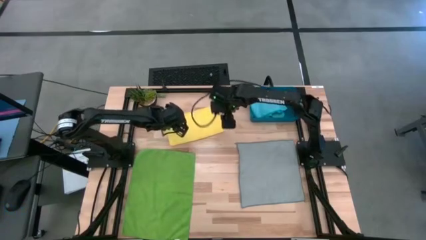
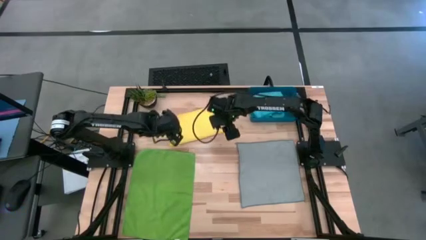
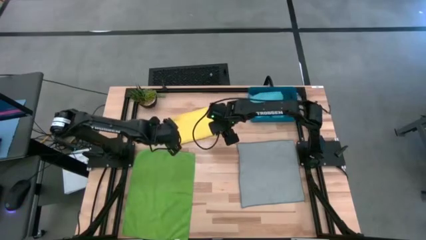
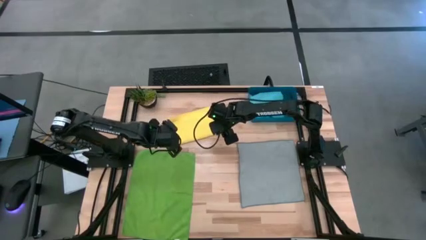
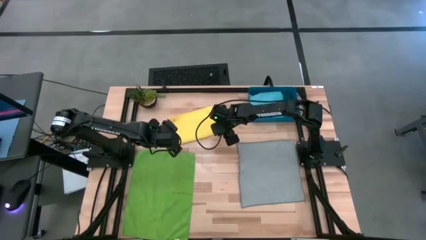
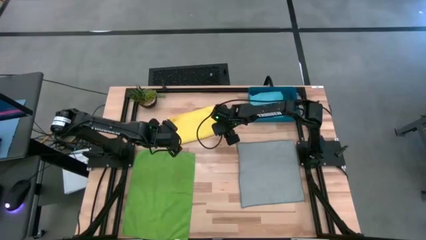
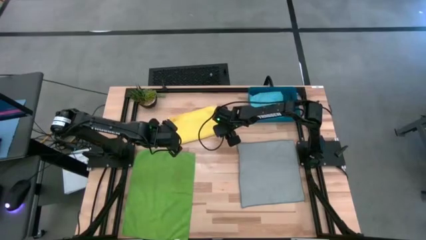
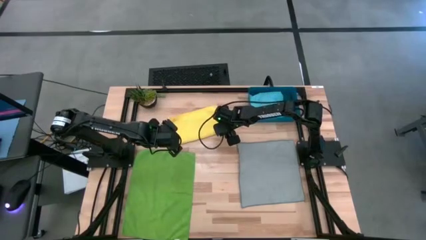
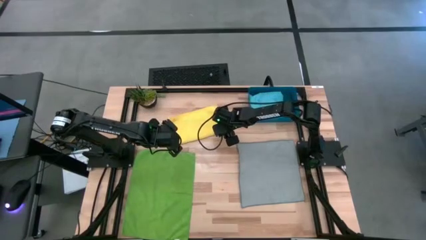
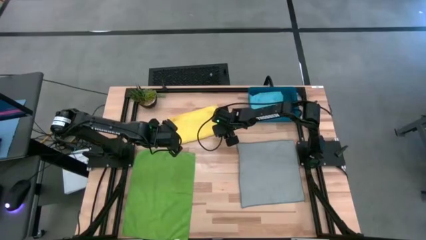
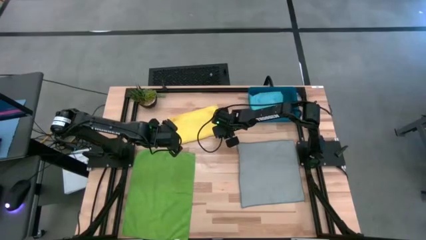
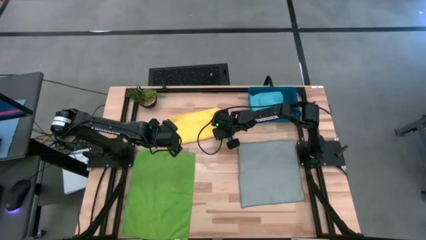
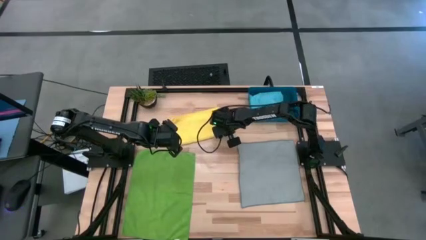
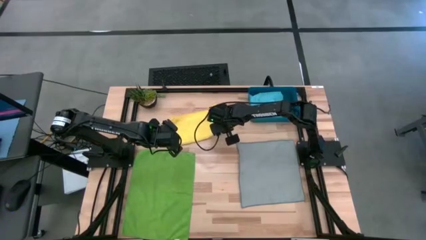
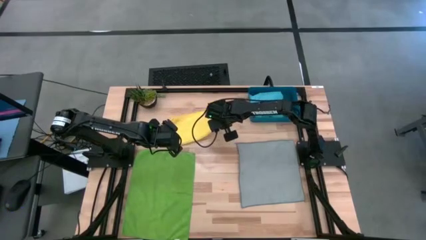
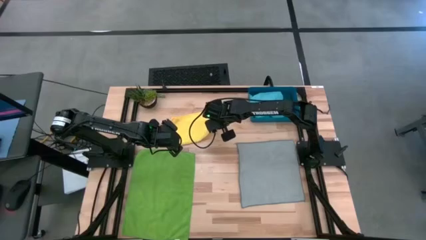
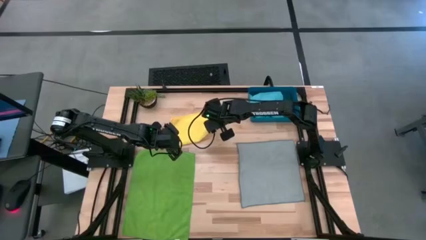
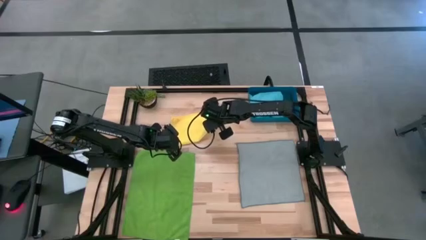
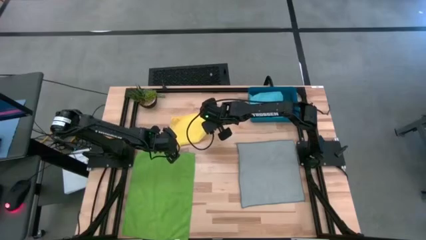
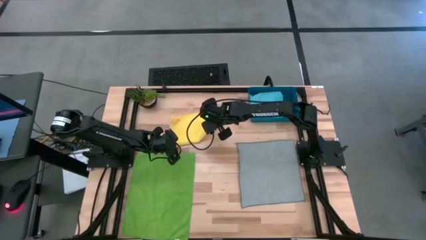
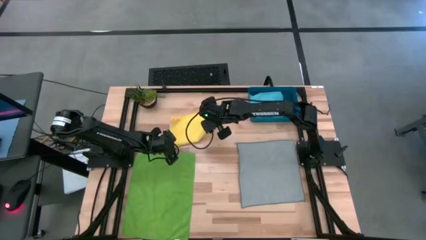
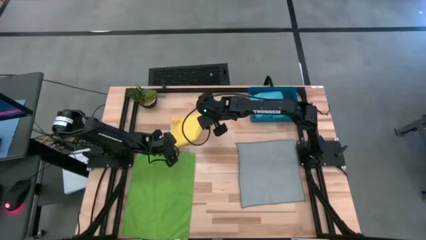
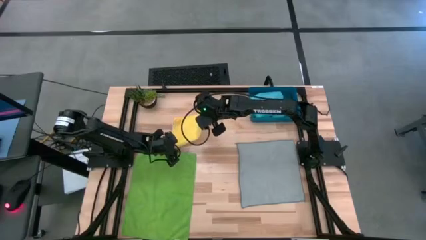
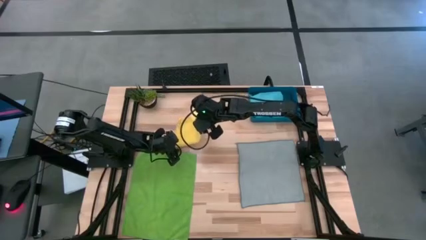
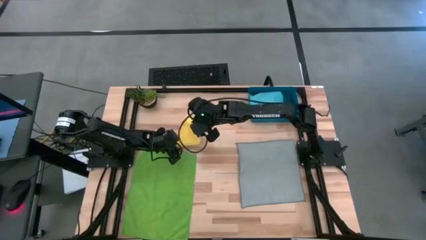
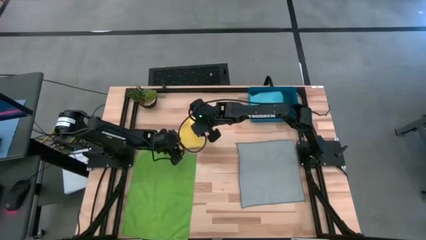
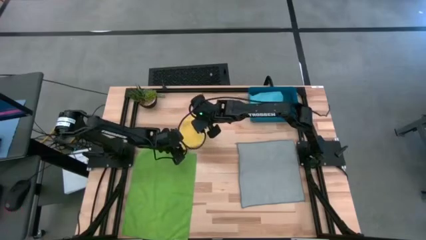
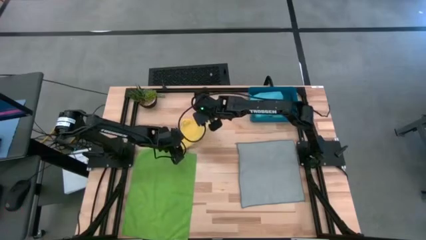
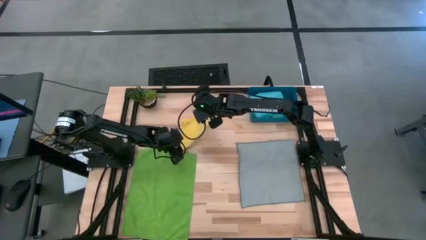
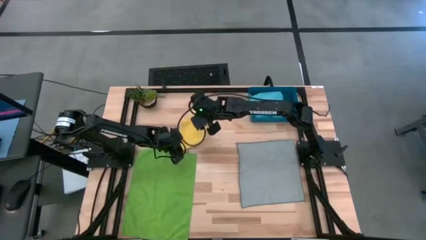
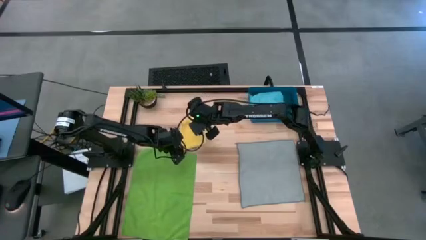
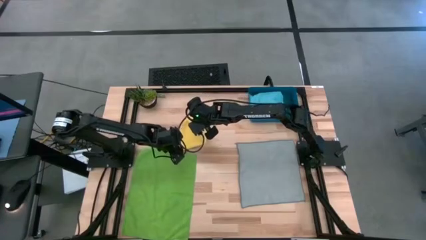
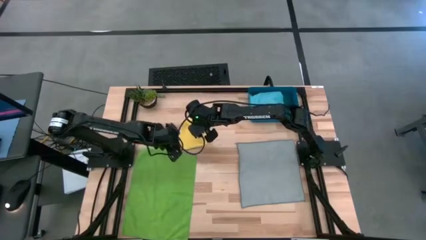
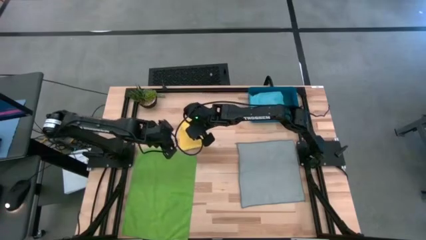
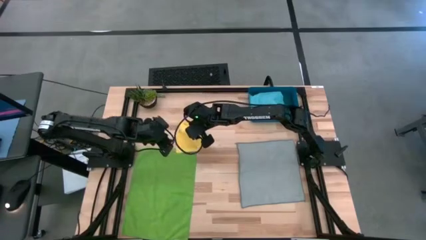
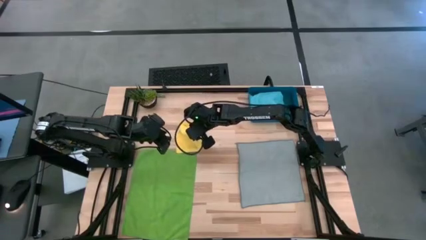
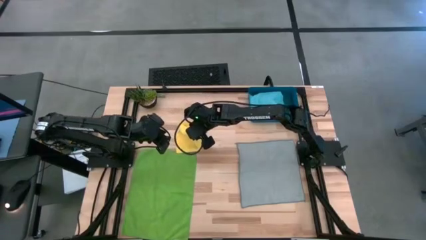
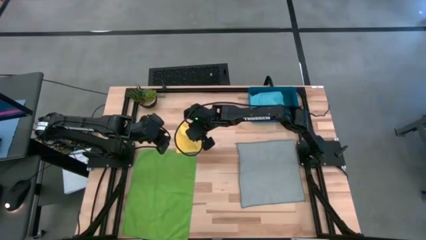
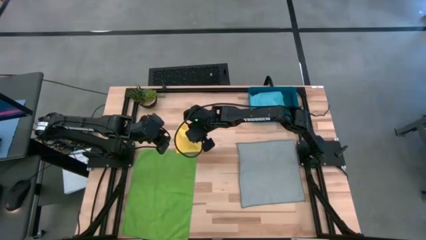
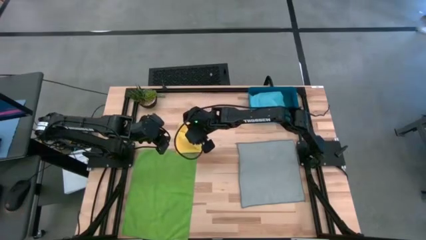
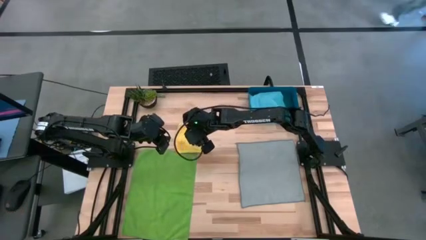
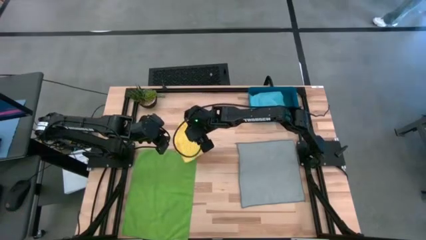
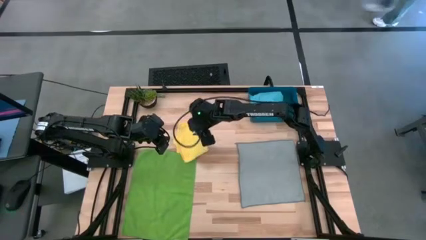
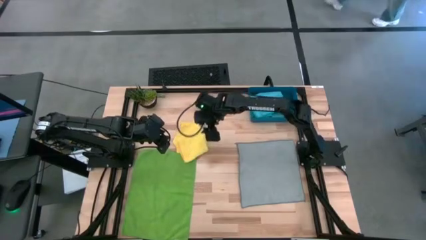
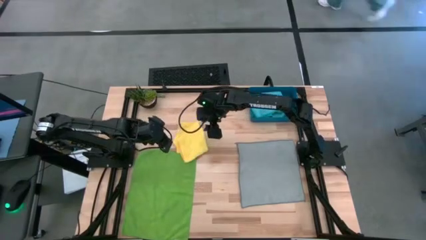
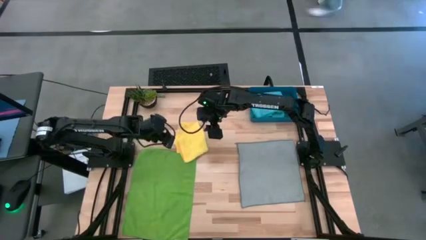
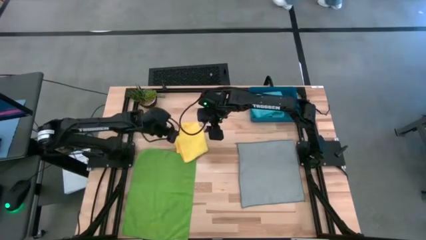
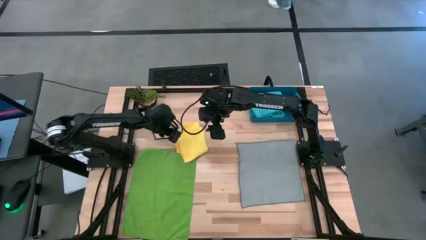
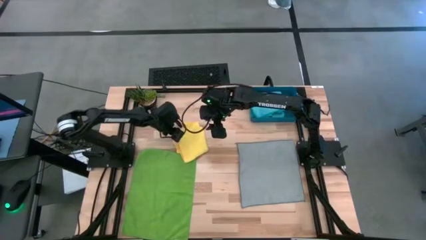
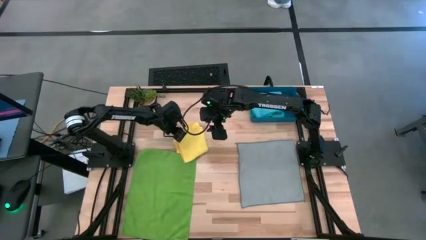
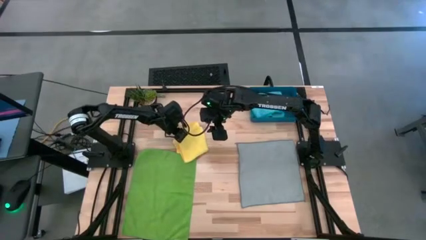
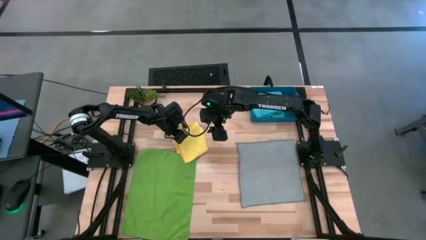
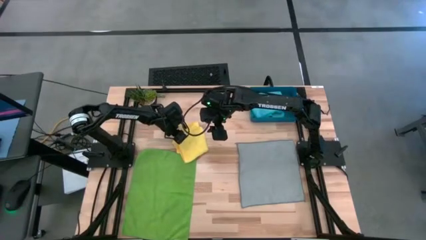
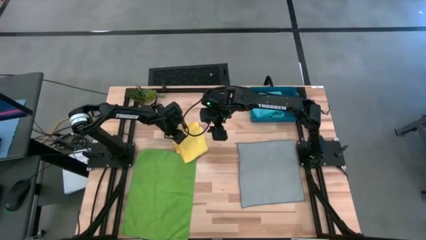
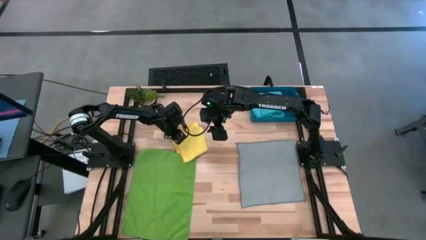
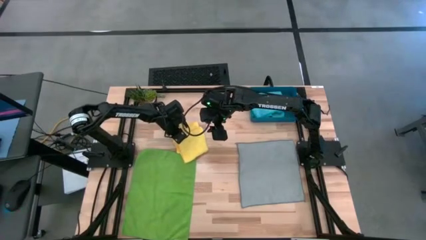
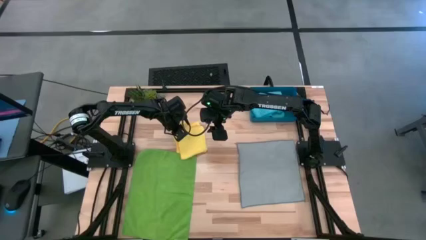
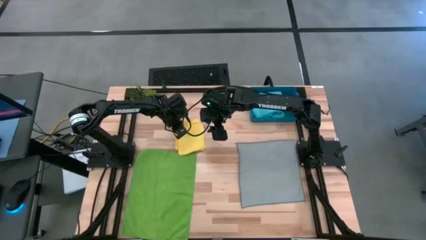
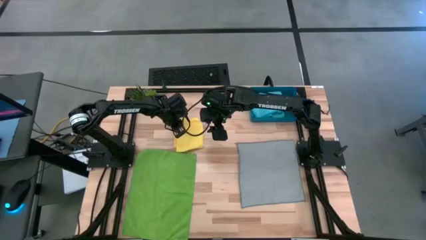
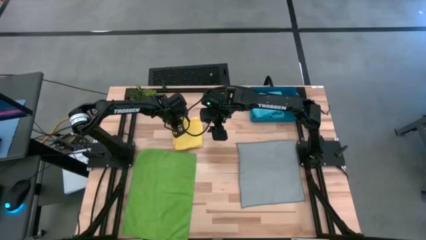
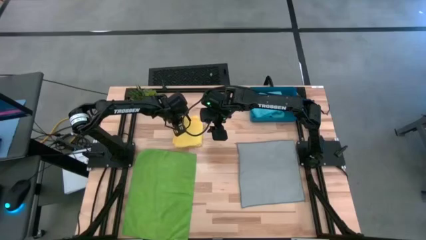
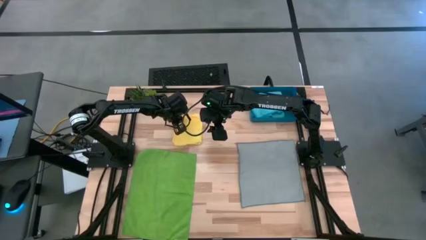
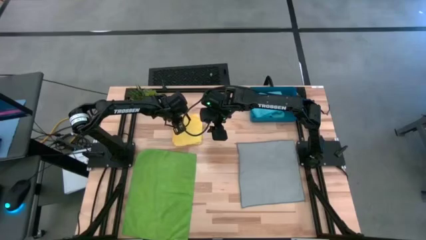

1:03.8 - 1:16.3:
Task: Fold microfiber towels
Fold the yellow microfiber cloth

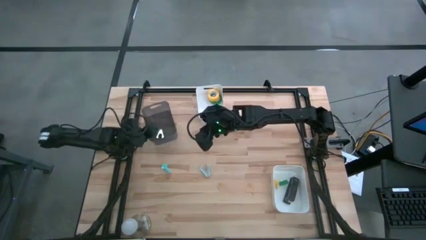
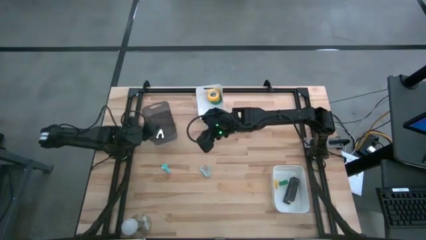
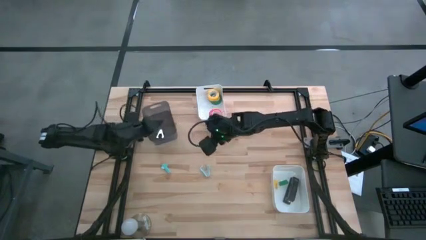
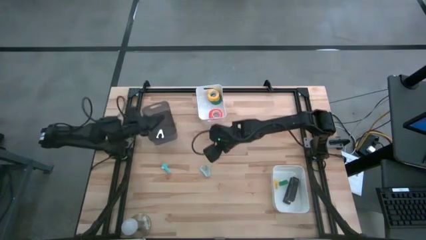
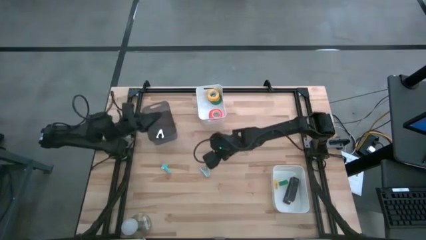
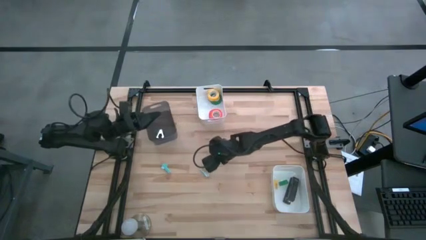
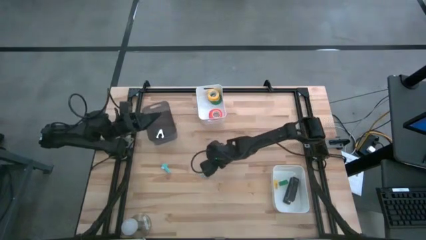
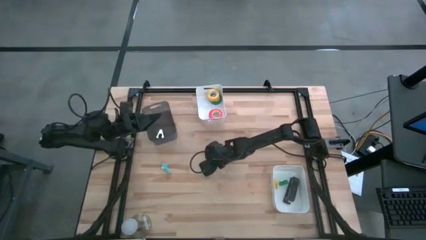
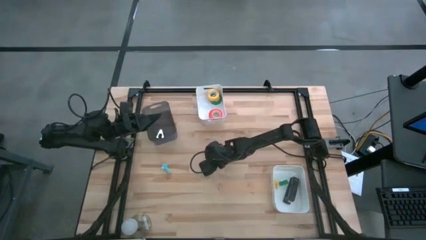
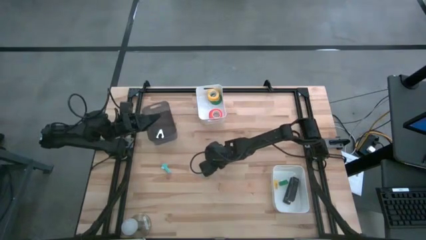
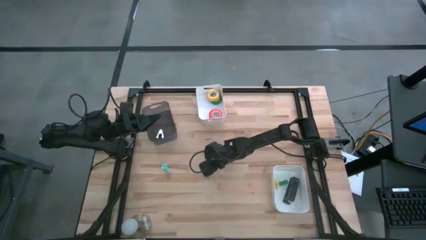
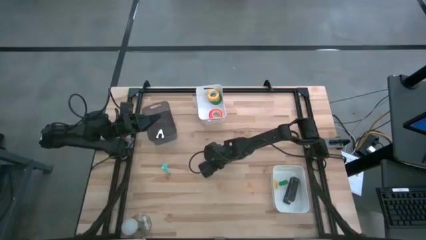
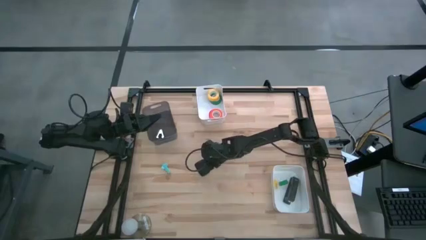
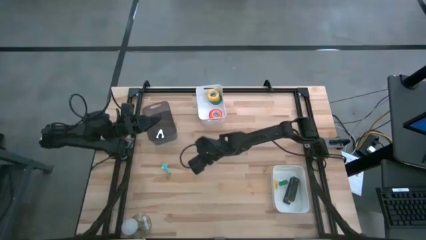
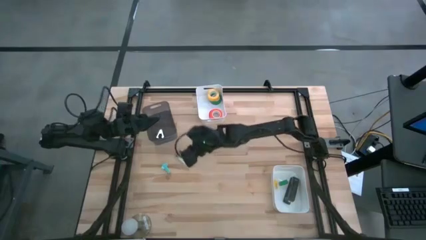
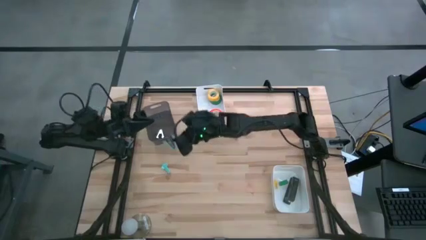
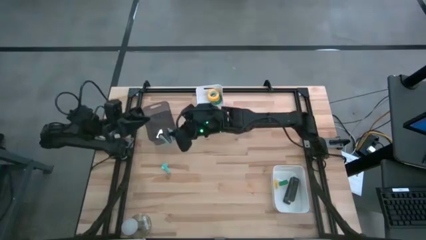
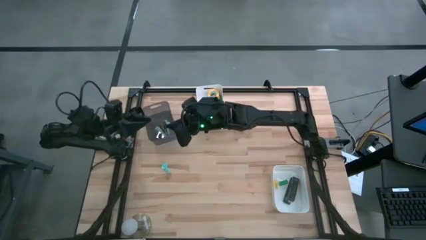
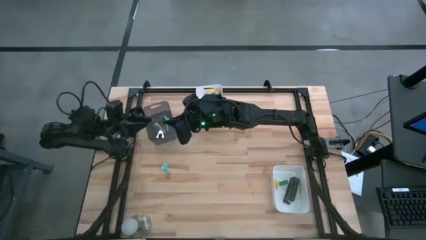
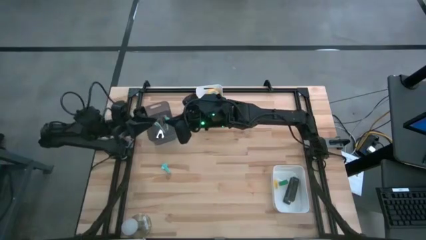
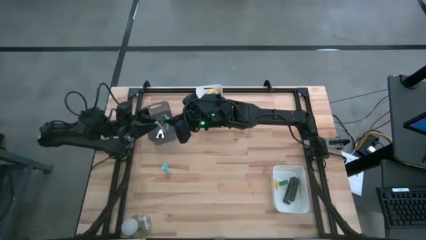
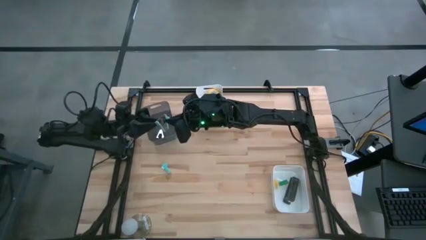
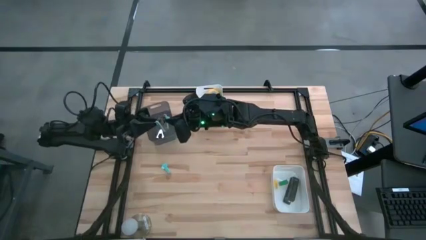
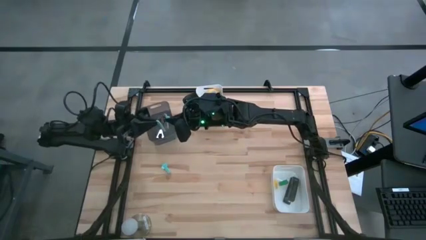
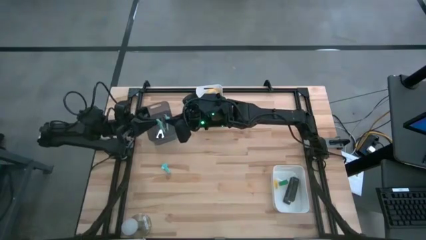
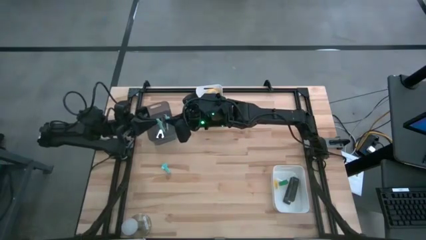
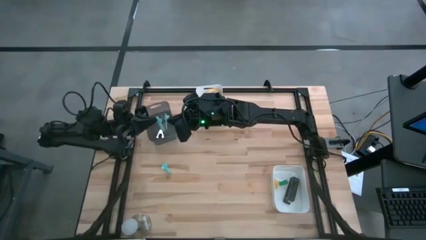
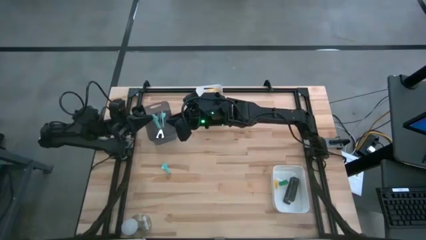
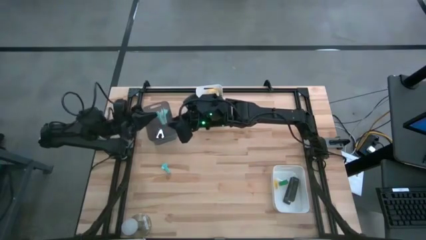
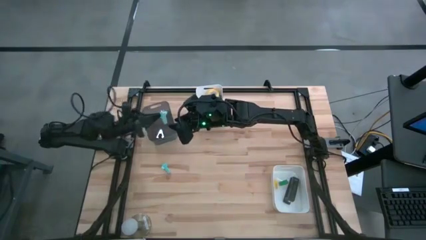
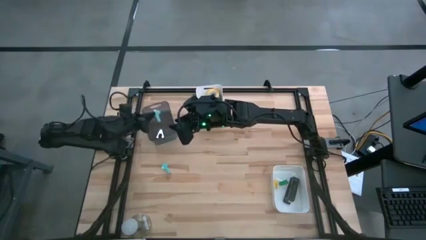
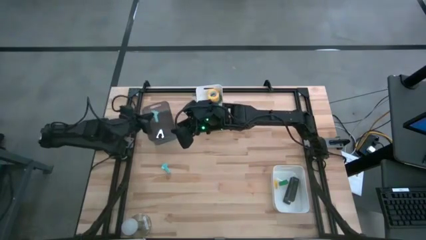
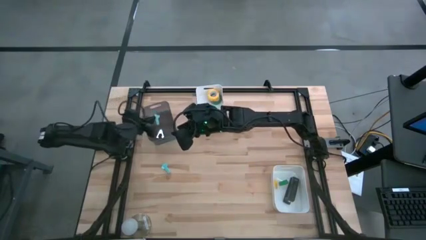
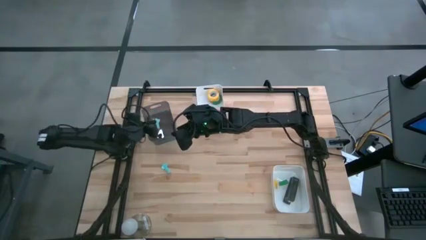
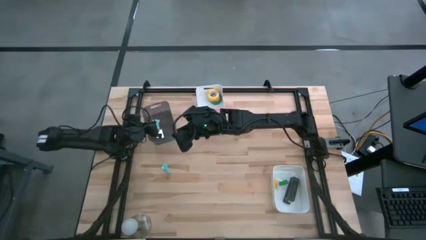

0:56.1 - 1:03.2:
Task: Pick and place Stapler, Stapler remover, tape
Put the right light blue staple remover into the black bin
